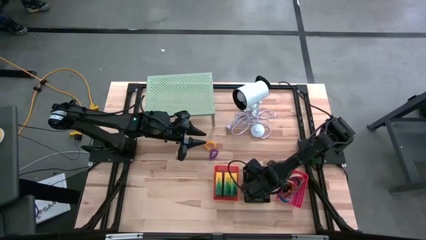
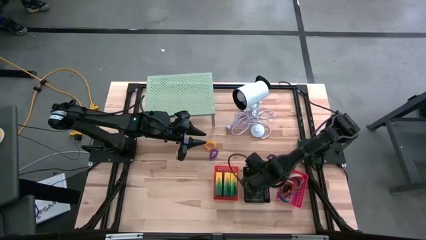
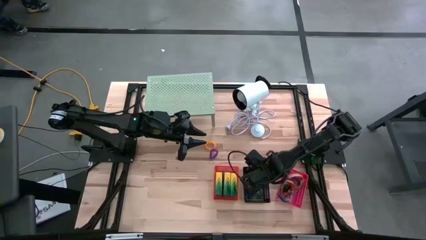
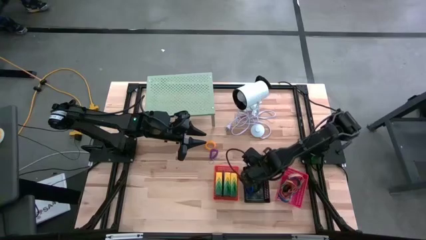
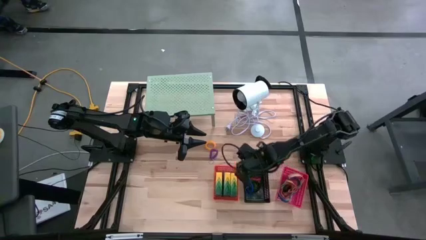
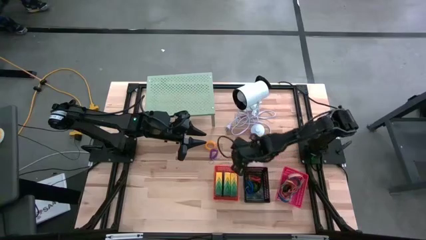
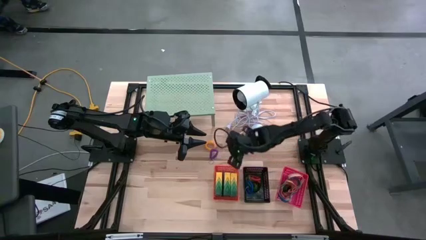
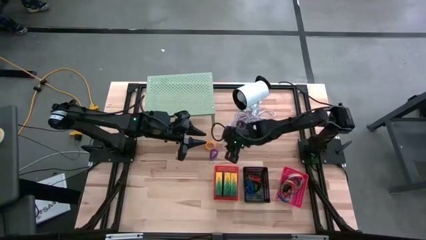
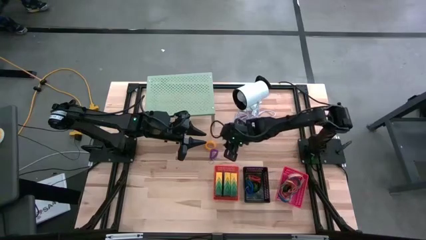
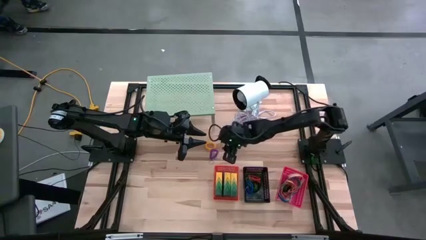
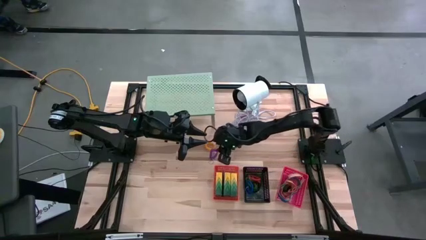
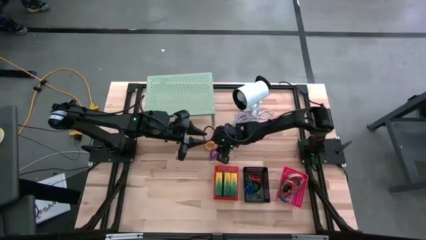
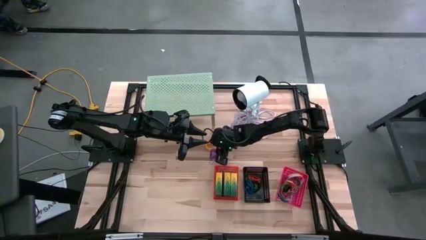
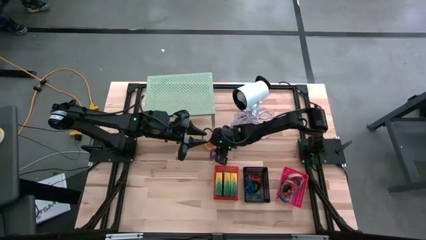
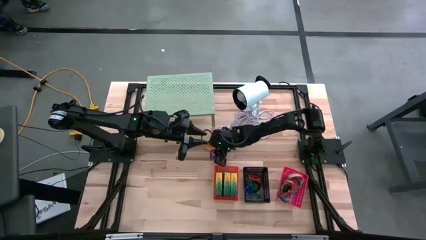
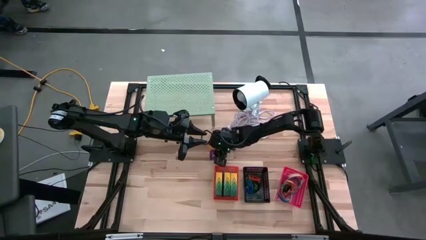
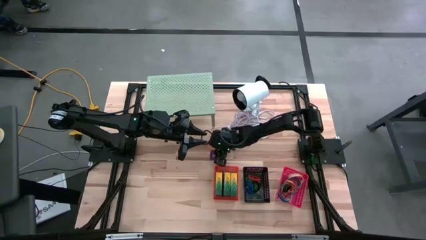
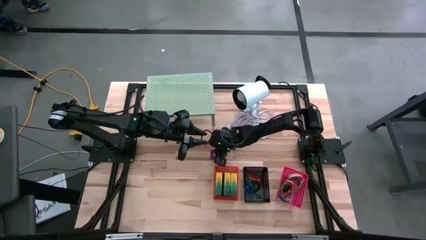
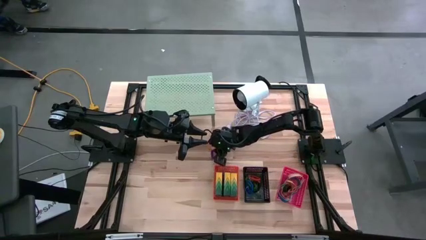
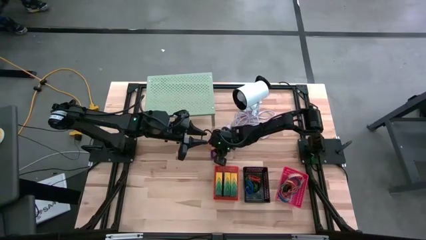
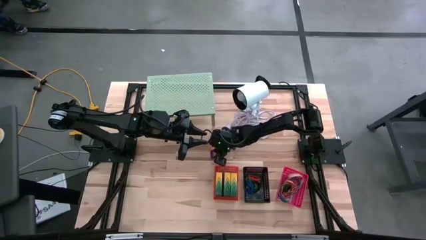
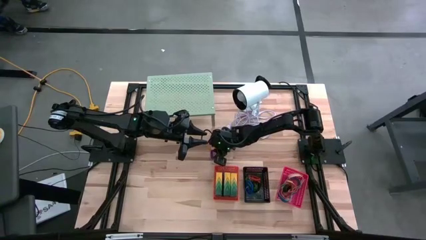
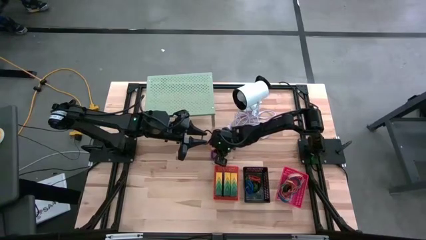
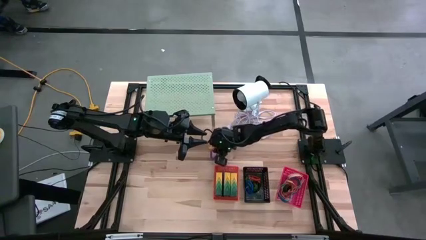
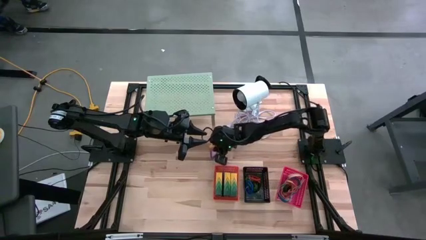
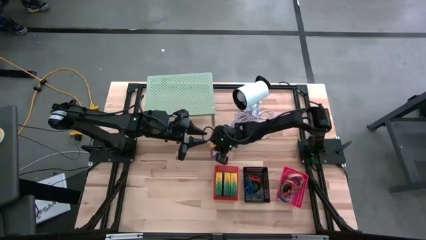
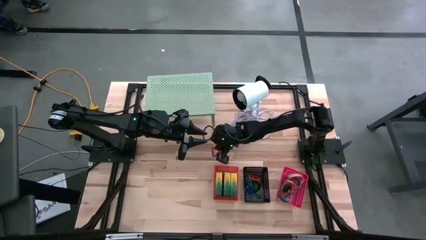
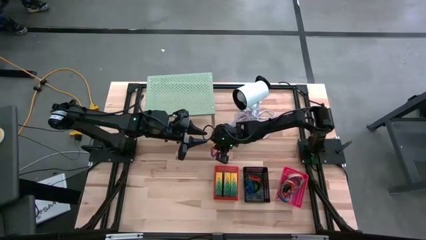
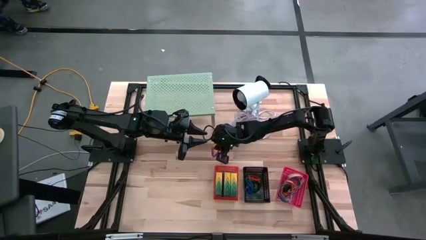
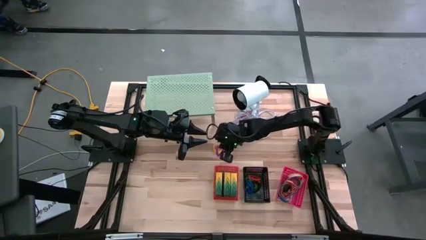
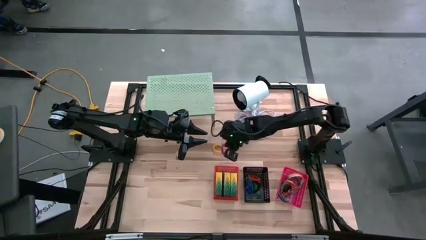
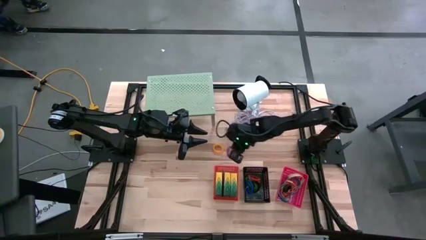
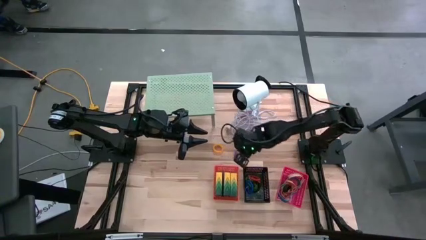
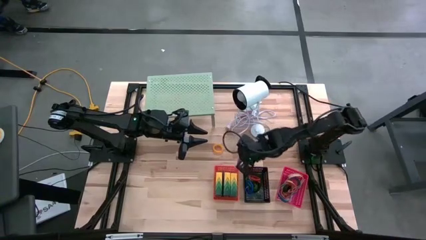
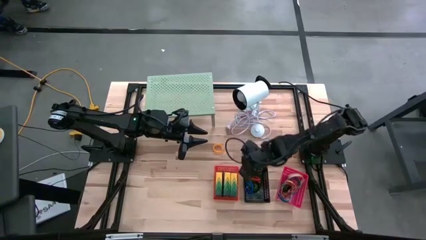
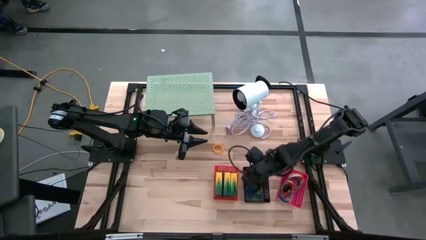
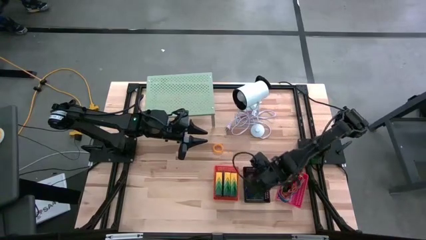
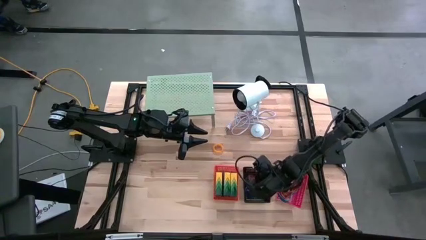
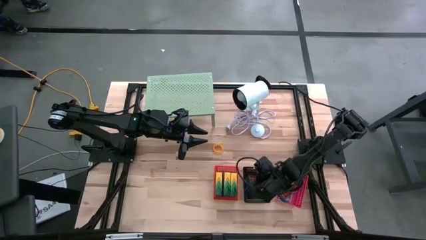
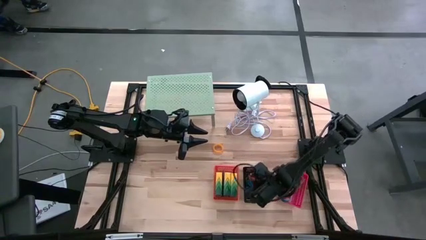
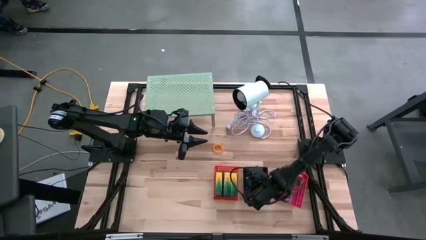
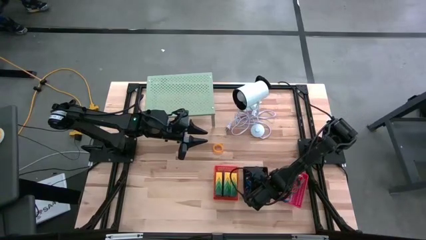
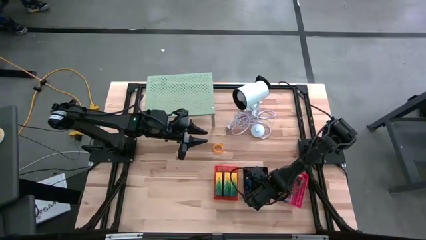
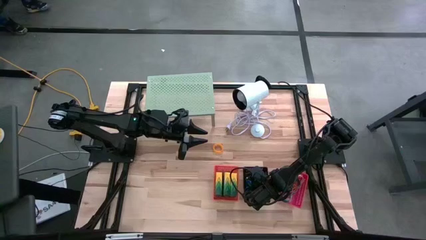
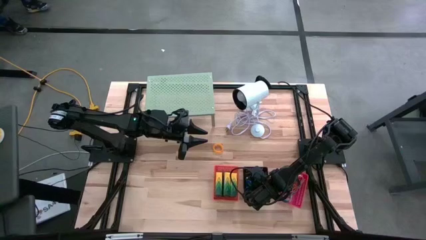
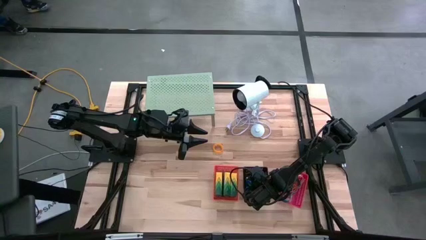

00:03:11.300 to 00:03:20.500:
Task: Pick & Place Office Desk Supplies
Put the violet wrist coil into the black basket

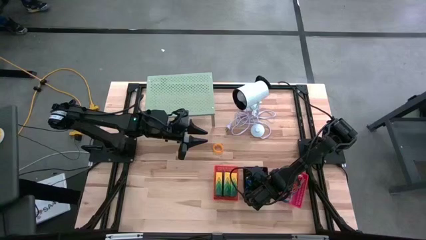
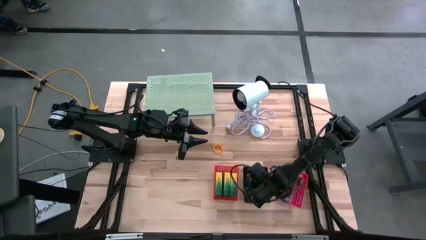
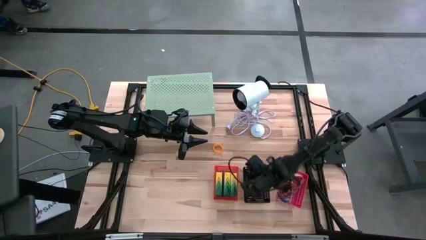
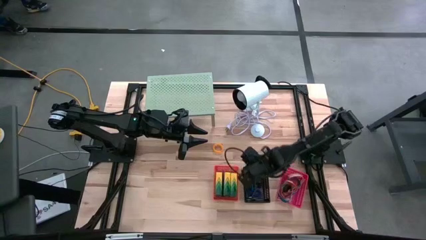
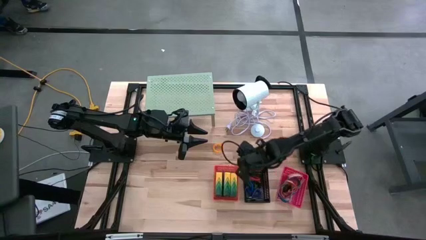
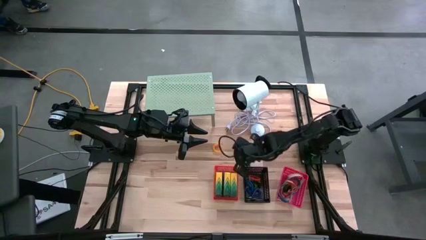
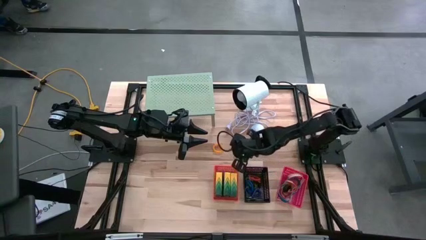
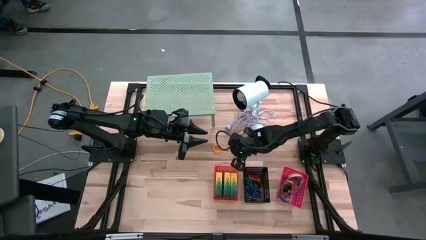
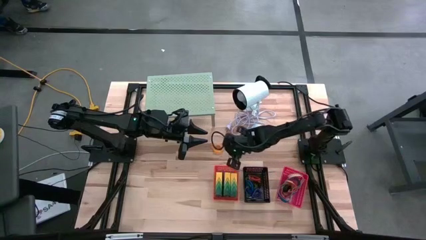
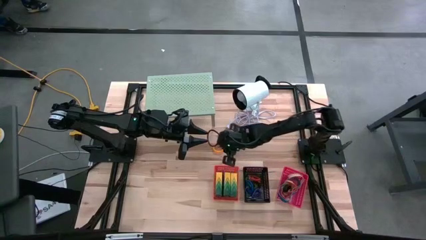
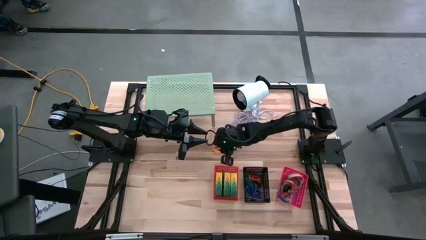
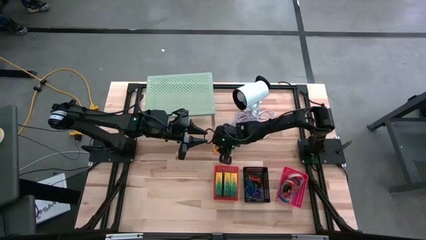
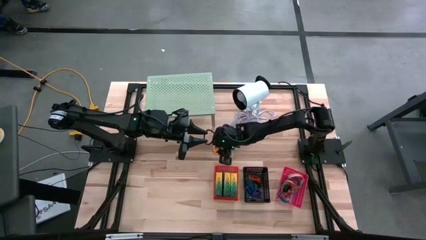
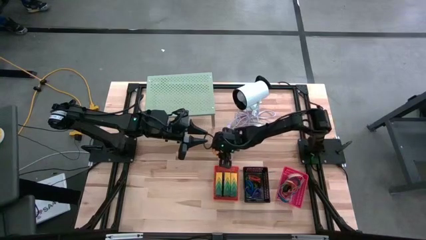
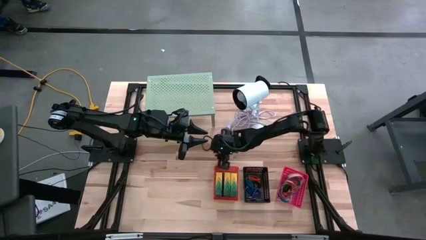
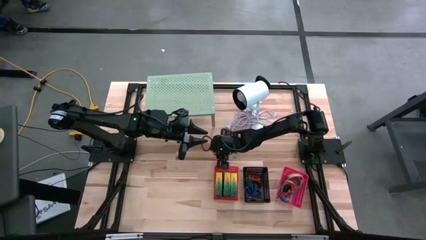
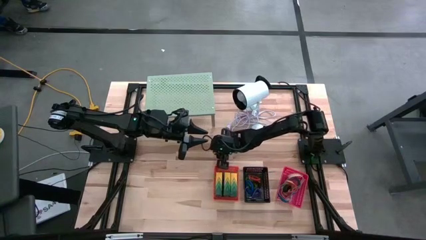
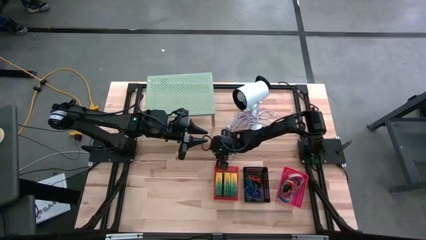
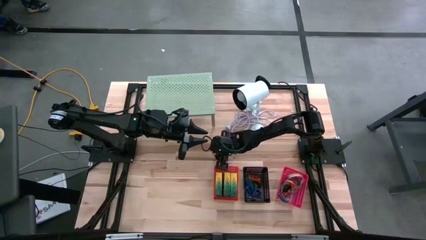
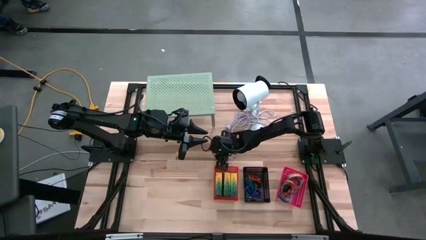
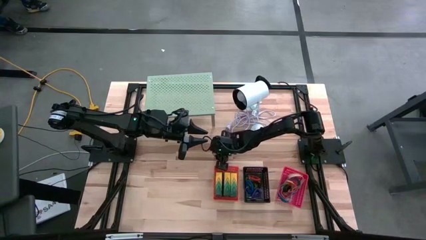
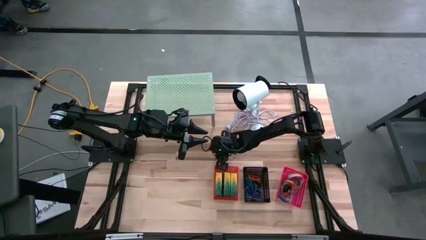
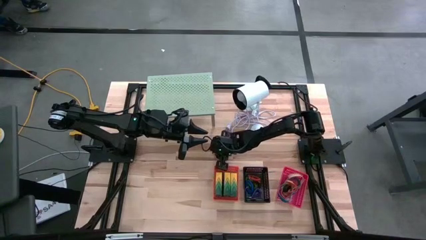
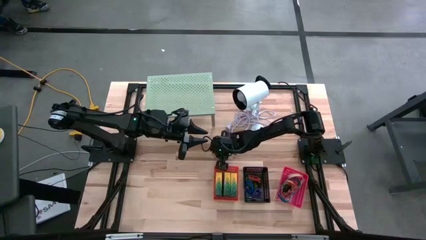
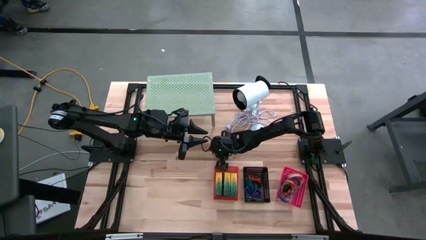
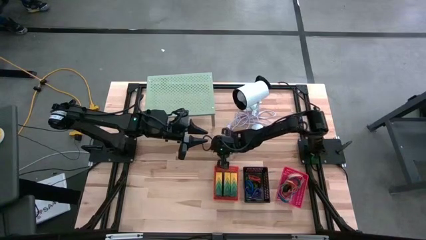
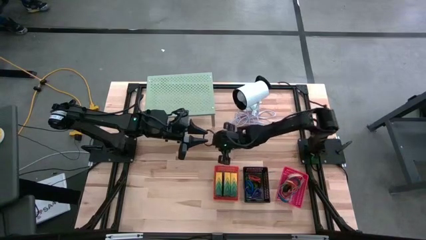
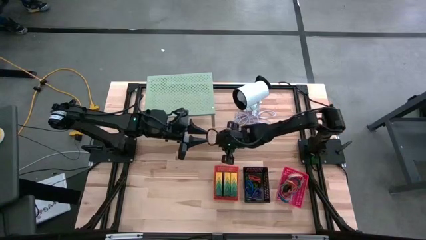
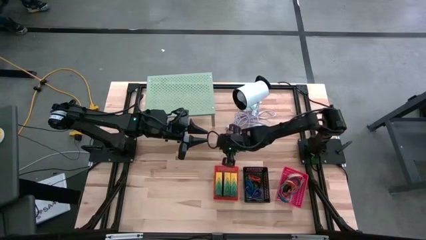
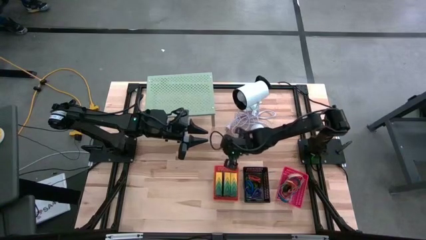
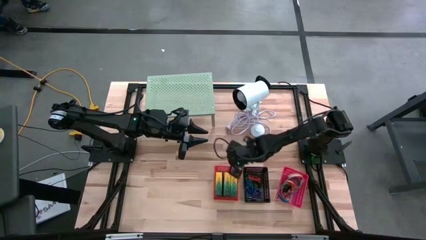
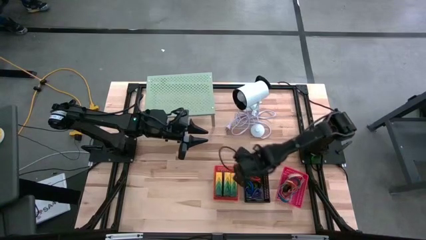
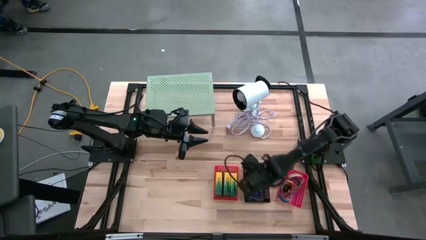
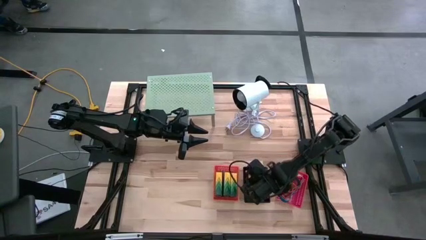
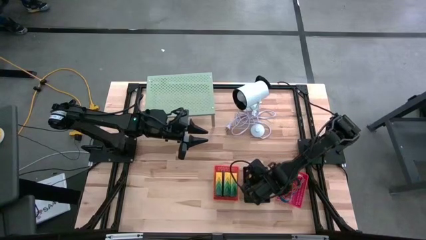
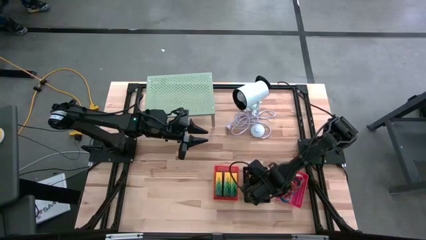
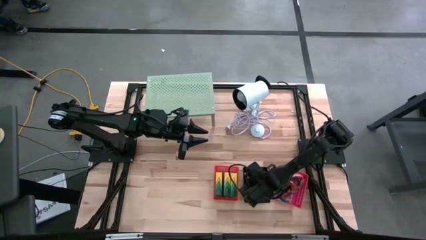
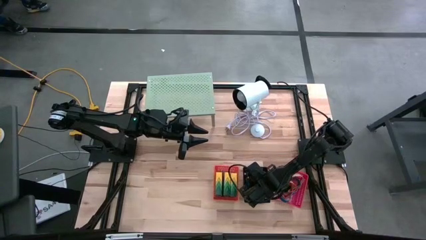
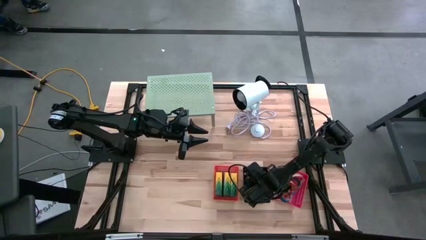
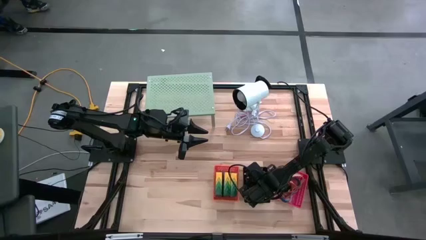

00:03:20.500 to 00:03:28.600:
Put the yellow wrist coil into the black basket
